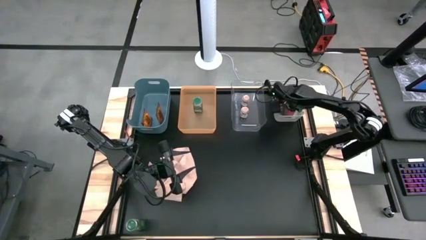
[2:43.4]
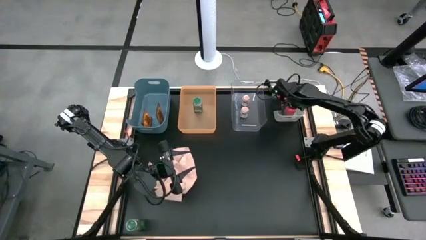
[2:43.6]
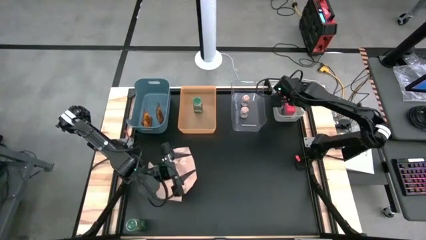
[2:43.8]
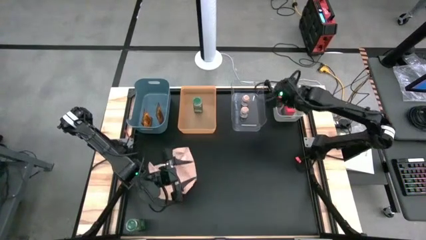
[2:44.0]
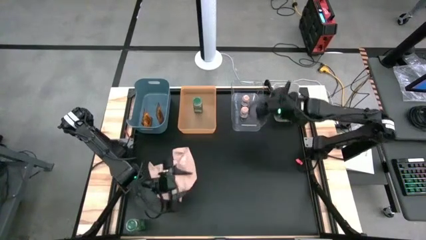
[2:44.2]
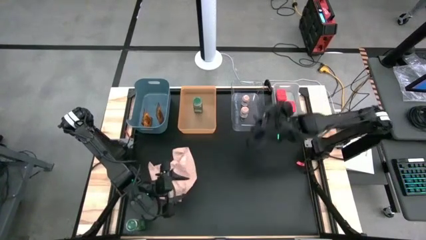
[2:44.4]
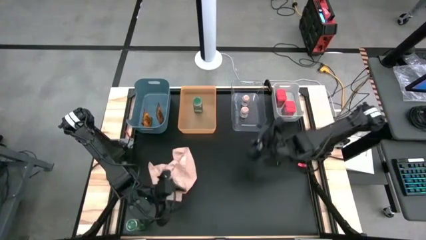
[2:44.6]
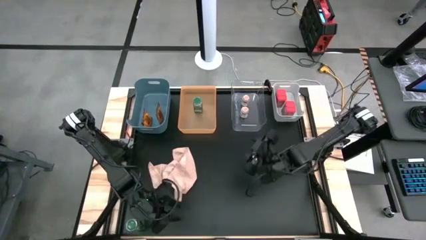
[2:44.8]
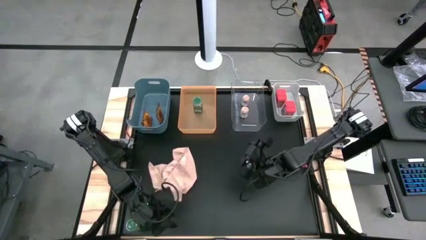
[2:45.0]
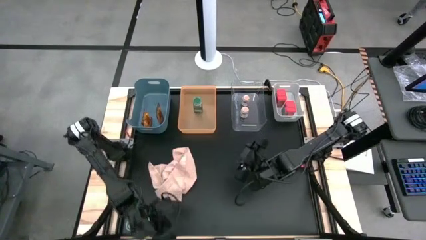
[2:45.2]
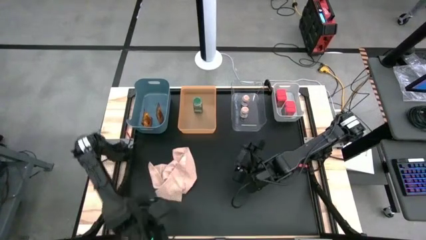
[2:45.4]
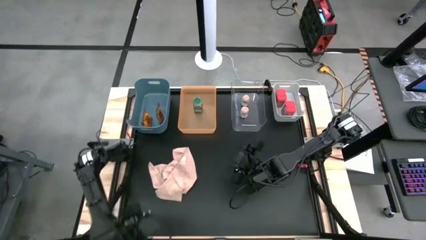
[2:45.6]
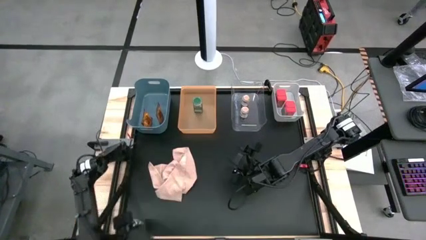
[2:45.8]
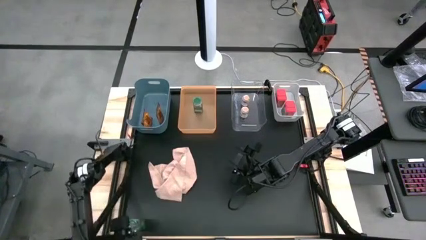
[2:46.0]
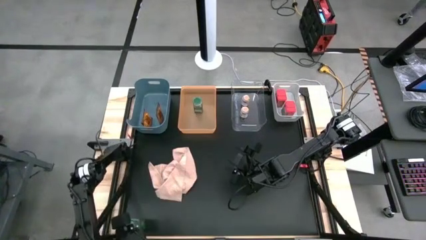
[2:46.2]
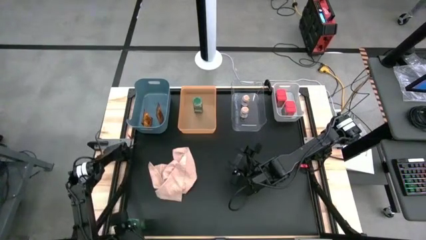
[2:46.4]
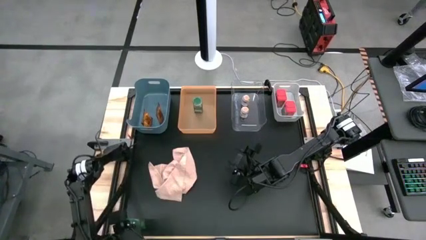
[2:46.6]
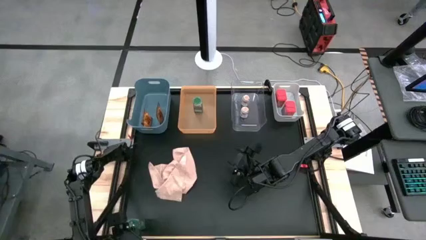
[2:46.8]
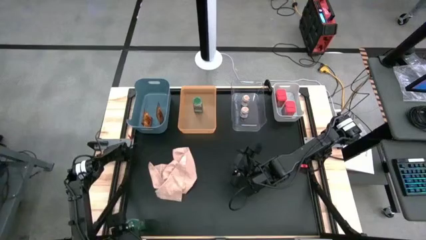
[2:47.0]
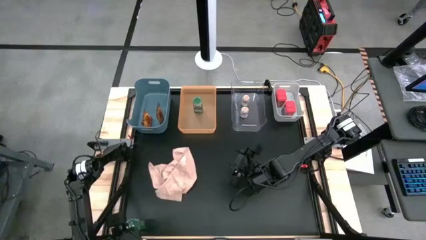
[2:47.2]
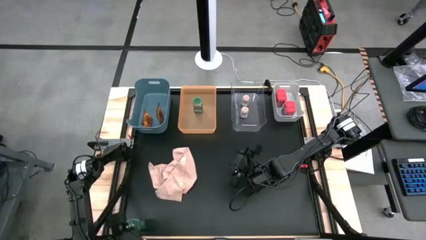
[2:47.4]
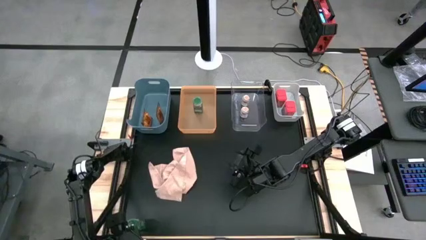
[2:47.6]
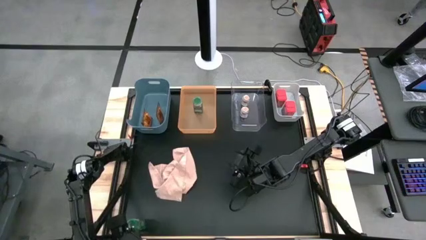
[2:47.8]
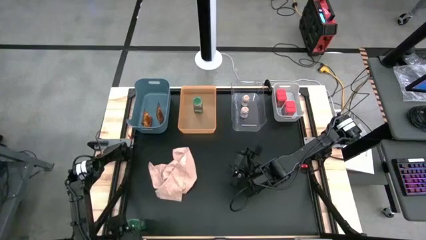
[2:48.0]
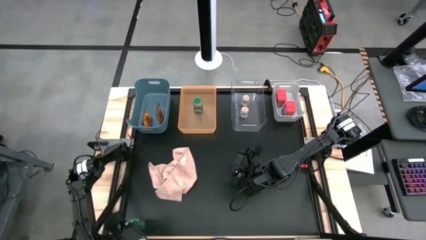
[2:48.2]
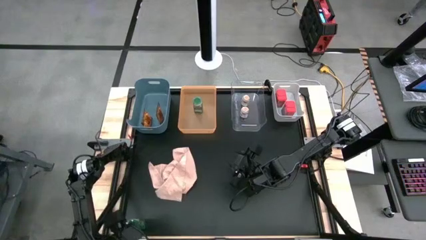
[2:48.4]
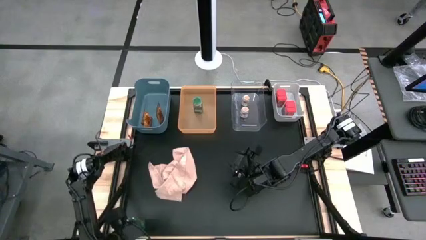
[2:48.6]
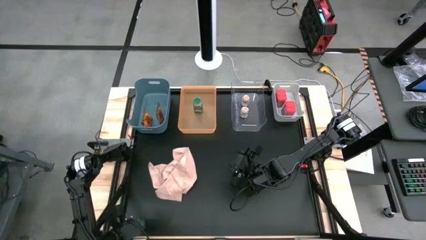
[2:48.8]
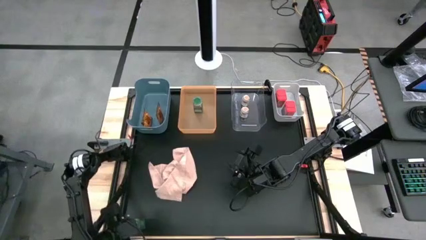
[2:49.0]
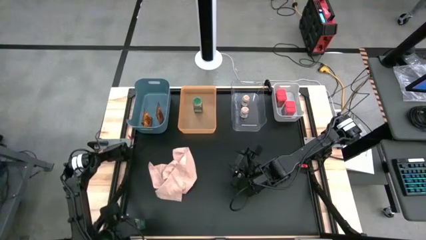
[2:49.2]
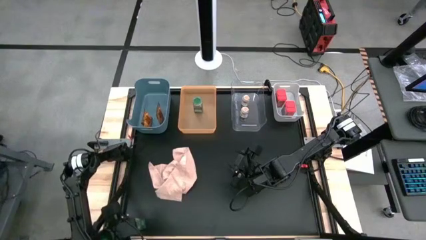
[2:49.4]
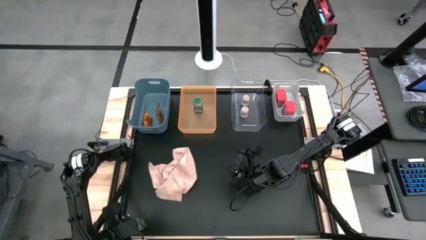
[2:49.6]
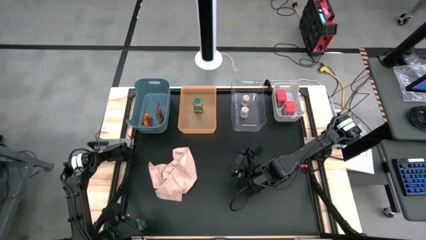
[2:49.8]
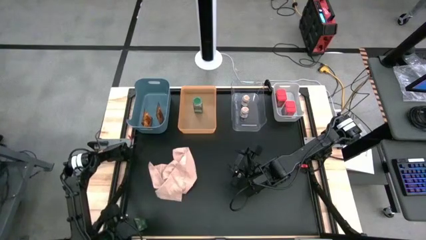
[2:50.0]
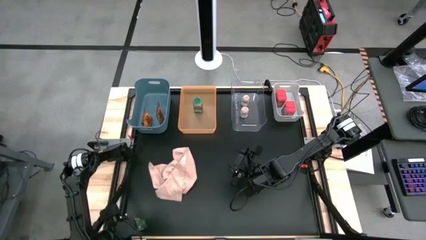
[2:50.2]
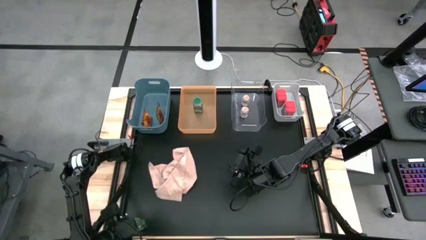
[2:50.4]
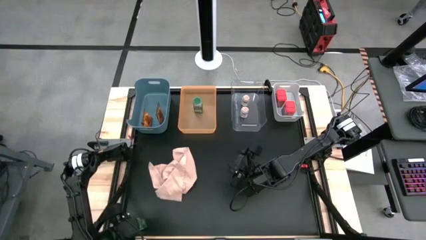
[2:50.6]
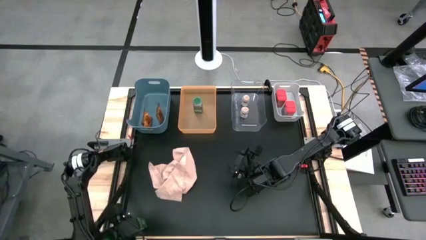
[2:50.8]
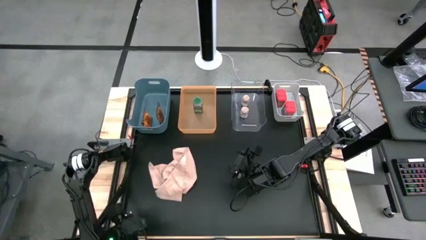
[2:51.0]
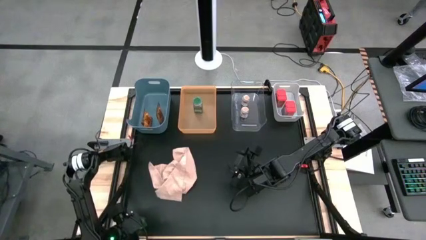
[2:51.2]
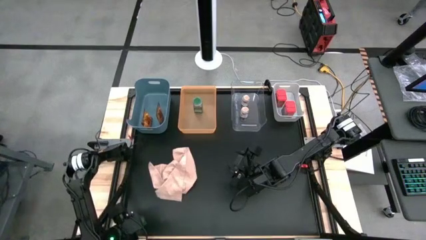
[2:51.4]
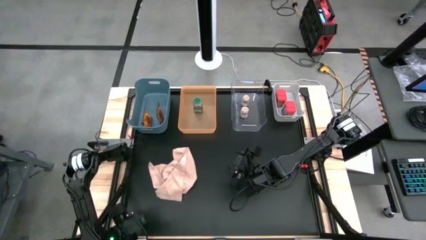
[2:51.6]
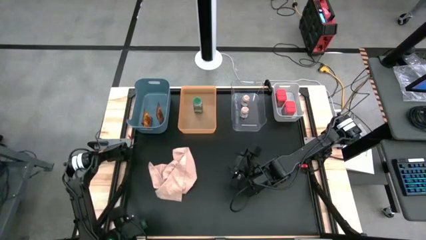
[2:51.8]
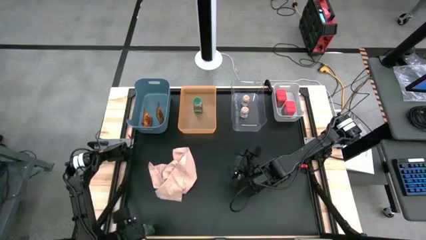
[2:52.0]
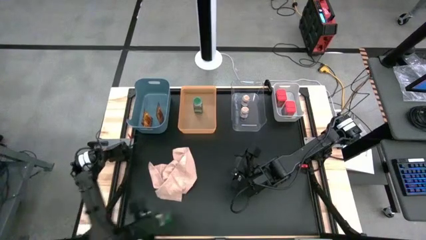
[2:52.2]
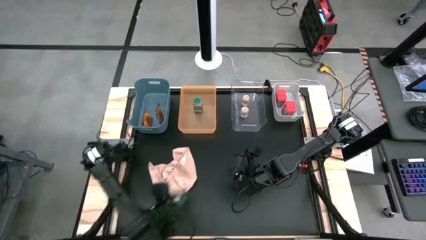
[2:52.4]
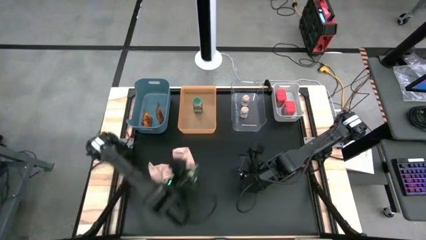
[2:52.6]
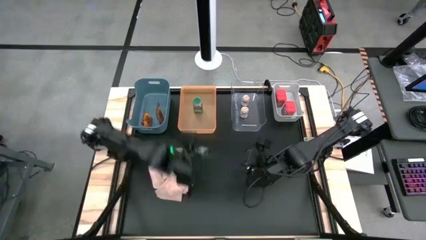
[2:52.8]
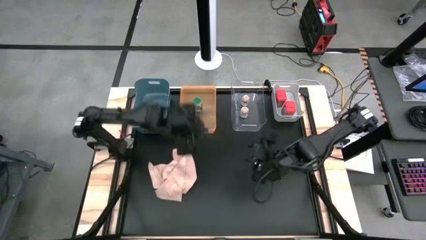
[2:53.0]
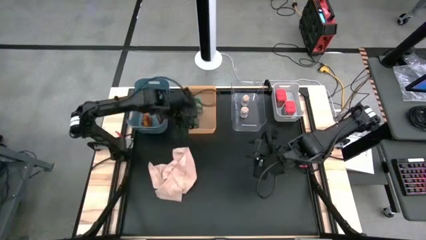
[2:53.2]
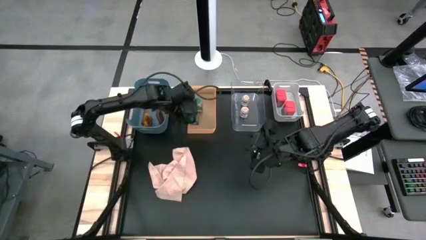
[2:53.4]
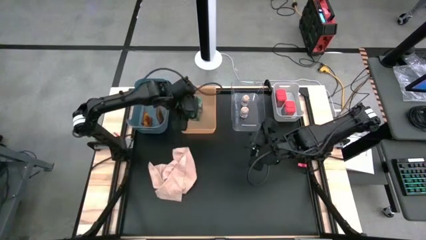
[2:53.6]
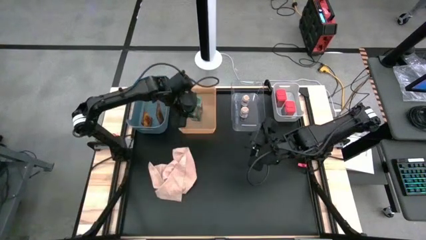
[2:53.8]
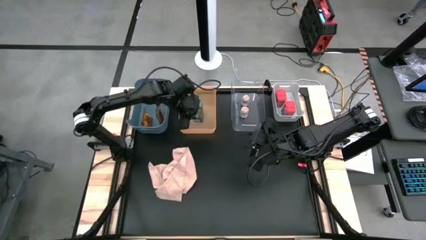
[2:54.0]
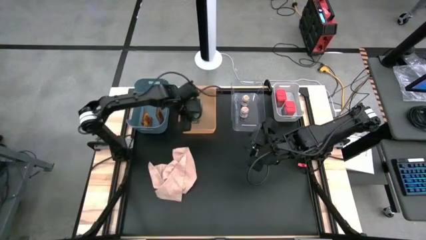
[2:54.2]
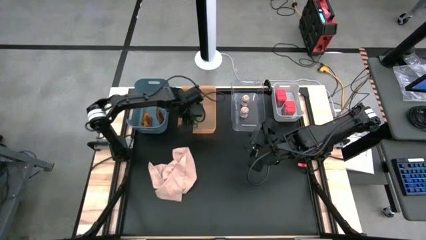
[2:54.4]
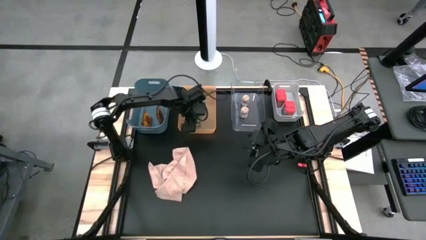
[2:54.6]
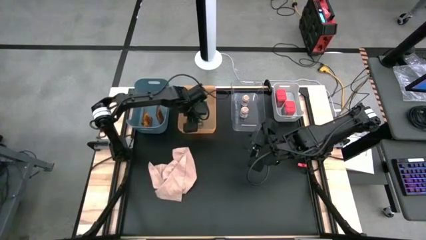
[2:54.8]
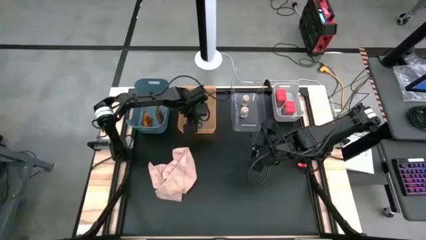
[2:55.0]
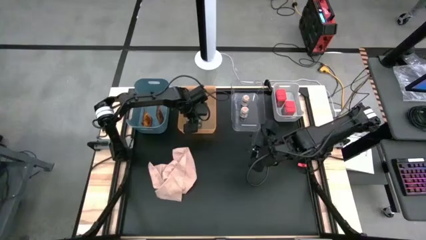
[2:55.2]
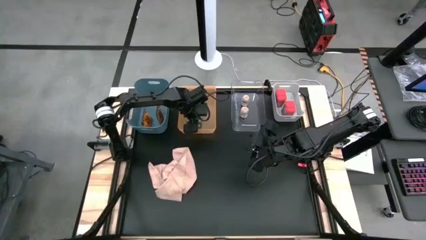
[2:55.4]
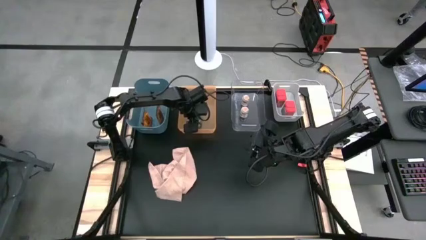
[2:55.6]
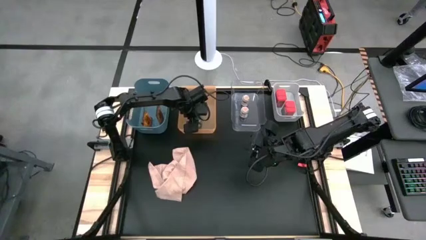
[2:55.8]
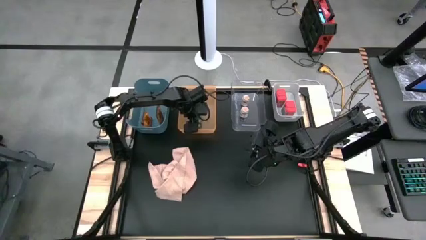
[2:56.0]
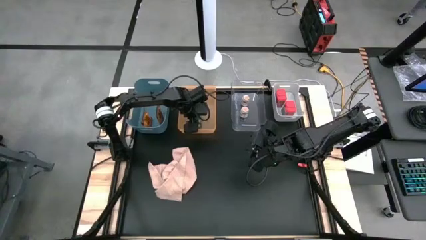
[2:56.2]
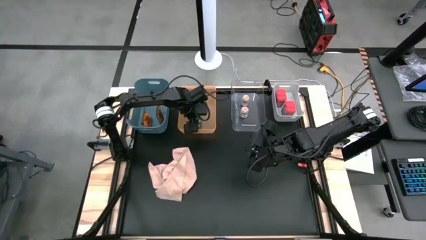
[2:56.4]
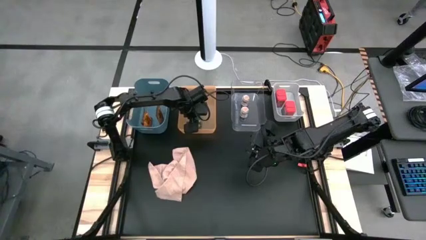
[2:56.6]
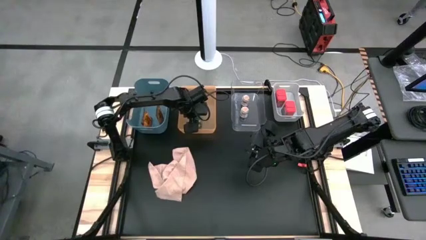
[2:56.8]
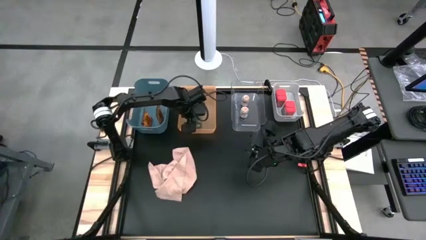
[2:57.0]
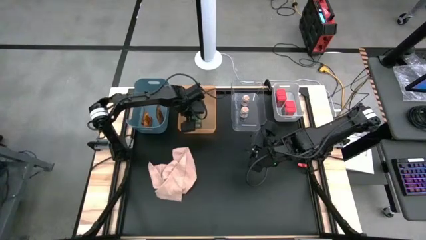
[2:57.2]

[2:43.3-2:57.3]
Task: Sort spices by type
Put the green seasoning bottle into the orange bin

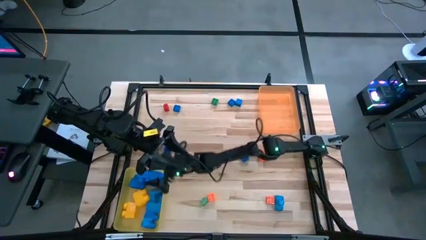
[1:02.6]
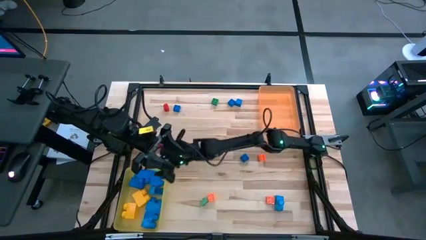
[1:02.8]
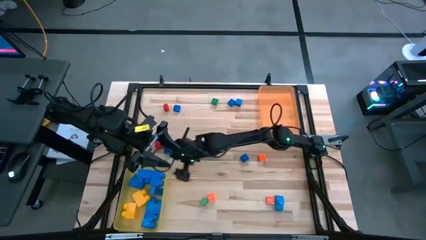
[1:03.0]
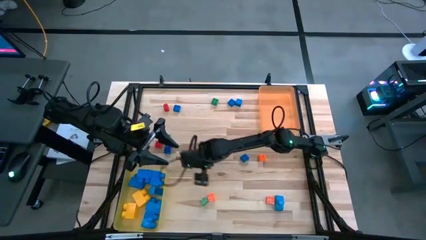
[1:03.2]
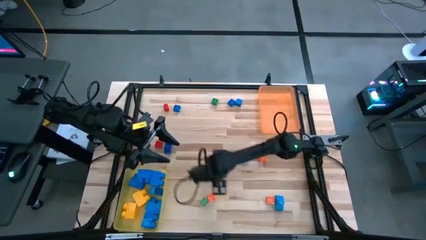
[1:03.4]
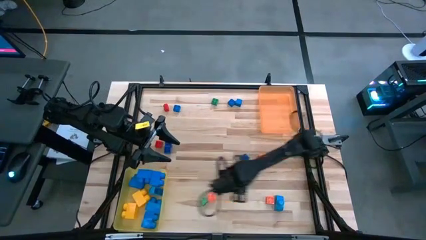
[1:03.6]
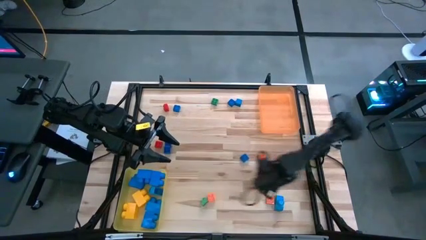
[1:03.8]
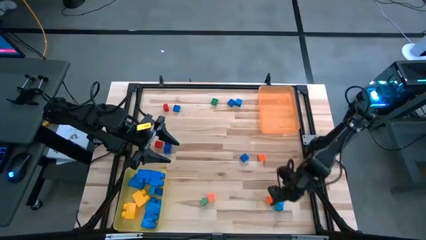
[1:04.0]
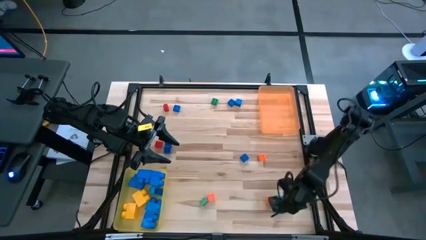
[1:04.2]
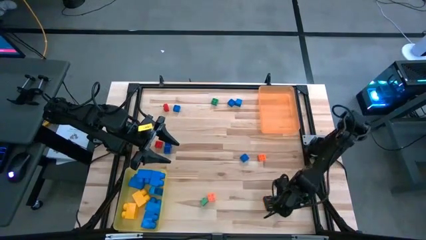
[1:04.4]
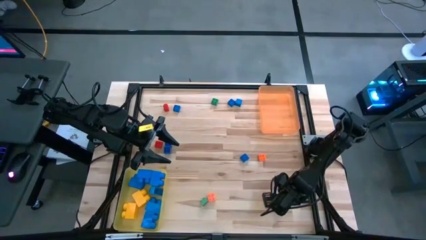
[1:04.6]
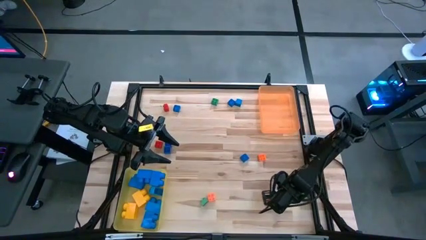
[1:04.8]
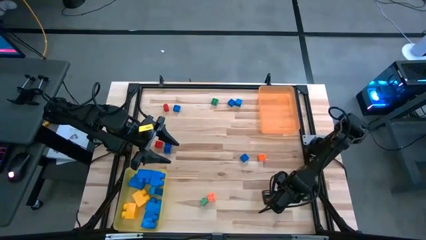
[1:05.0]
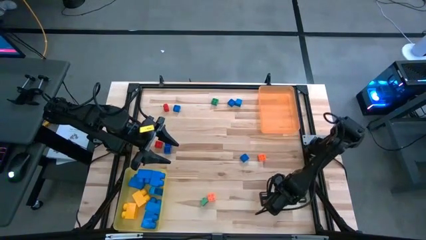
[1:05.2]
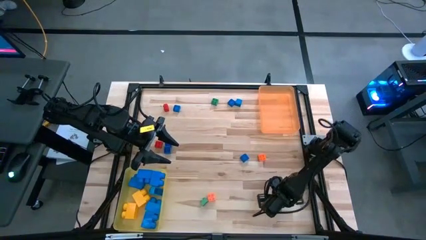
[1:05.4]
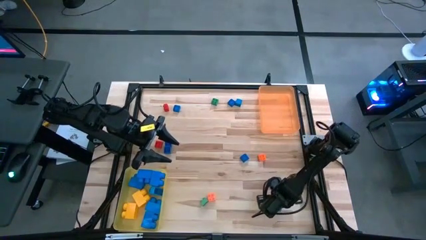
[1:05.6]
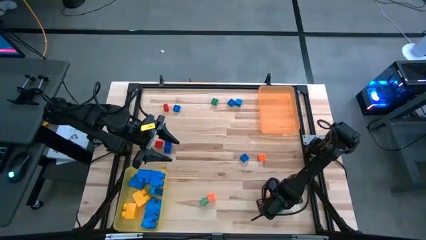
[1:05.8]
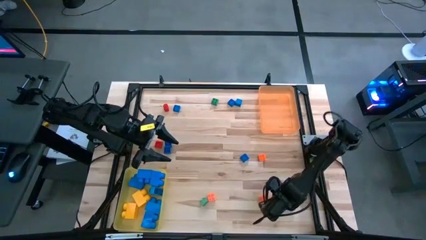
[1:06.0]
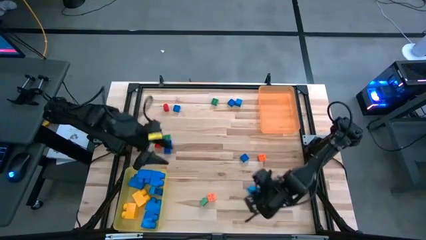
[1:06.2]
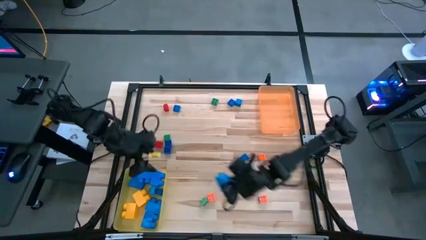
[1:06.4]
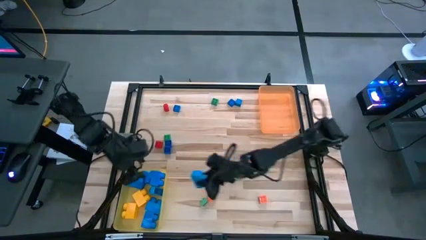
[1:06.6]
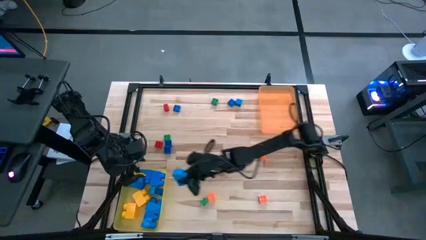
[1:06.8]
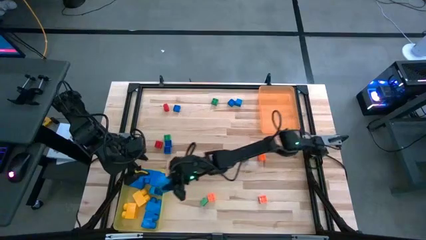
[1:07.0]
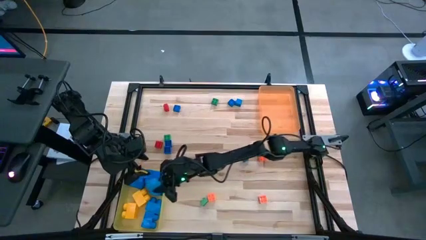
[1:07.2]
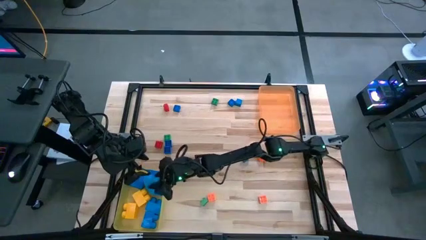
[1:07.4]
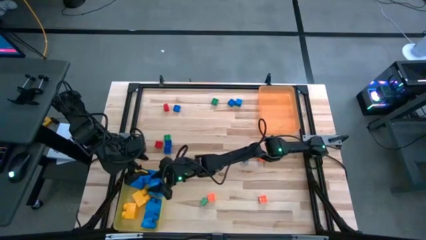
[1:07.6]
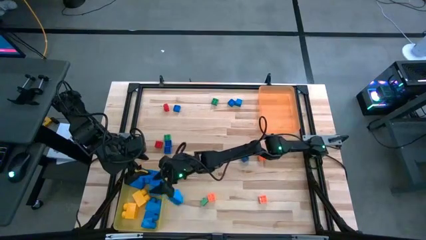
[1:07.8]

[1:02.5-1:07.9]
Task: Sort blocks by size
Put the large blue game piece into the yellow bin
